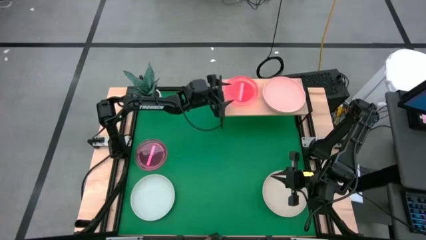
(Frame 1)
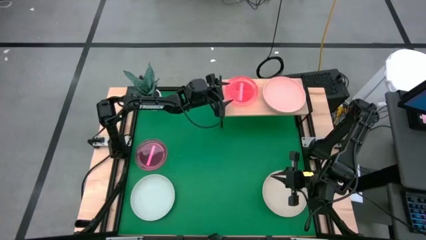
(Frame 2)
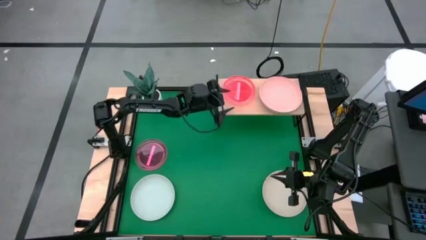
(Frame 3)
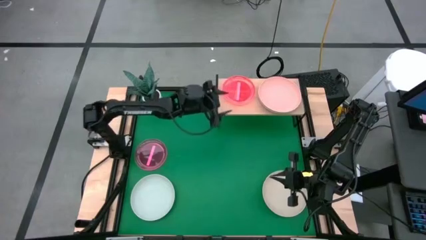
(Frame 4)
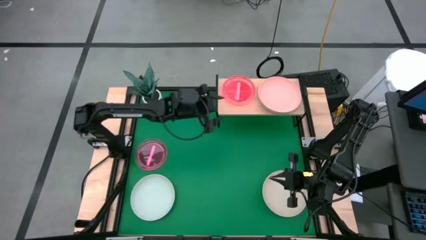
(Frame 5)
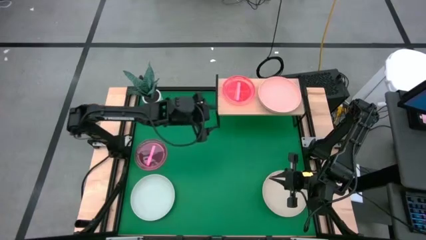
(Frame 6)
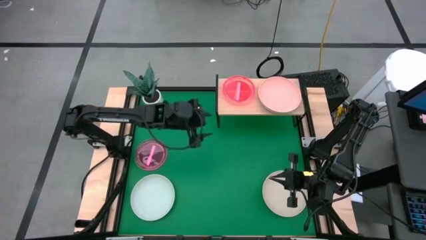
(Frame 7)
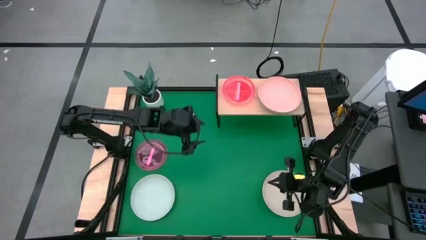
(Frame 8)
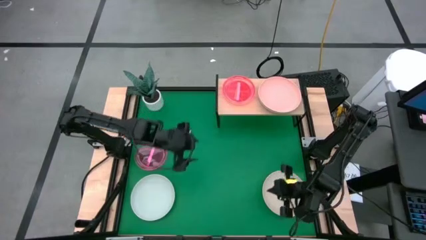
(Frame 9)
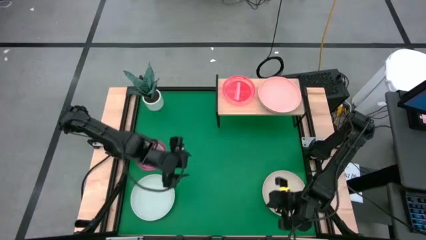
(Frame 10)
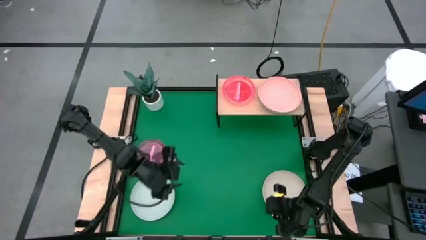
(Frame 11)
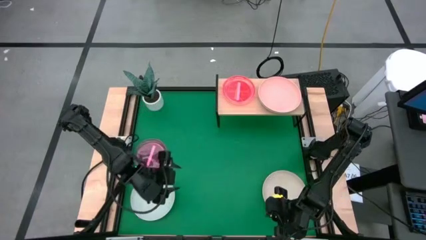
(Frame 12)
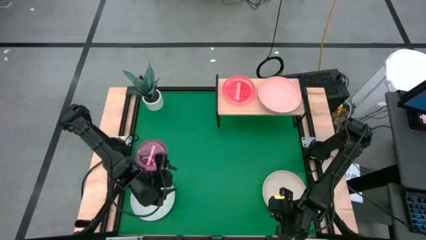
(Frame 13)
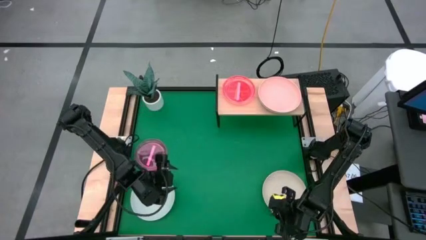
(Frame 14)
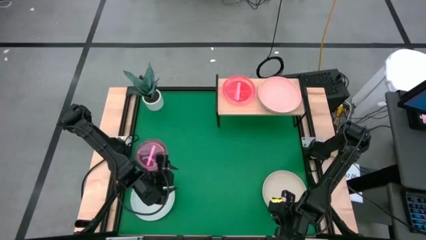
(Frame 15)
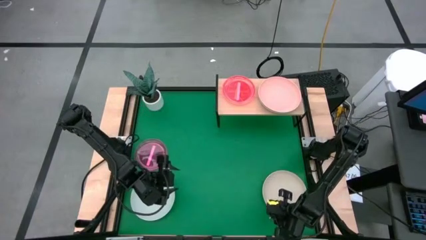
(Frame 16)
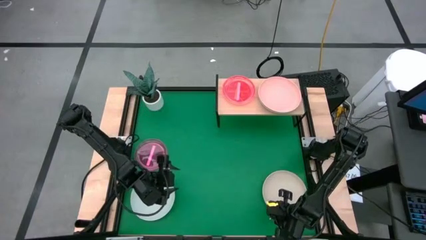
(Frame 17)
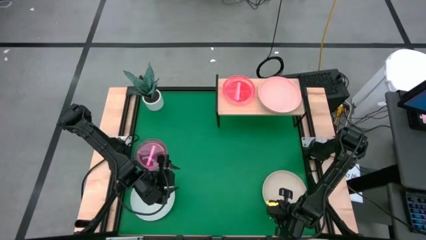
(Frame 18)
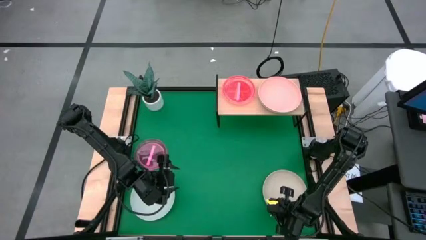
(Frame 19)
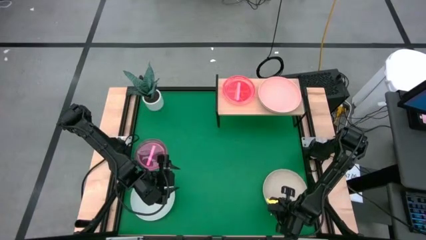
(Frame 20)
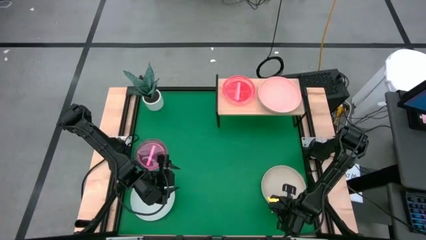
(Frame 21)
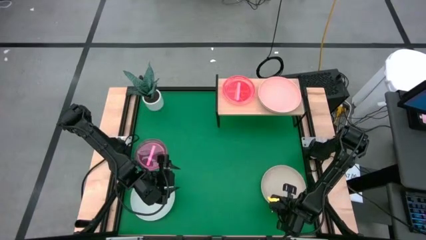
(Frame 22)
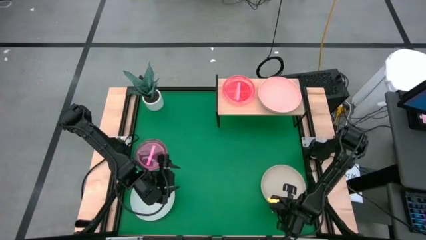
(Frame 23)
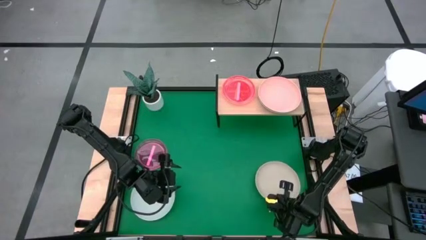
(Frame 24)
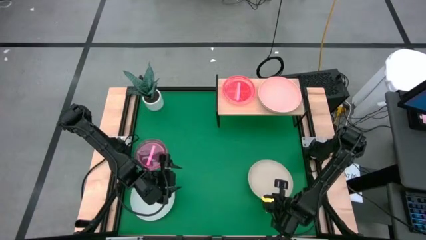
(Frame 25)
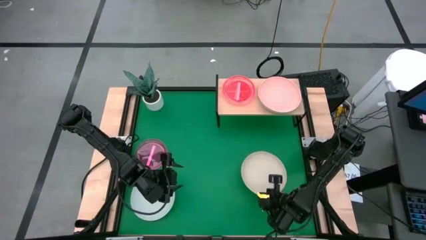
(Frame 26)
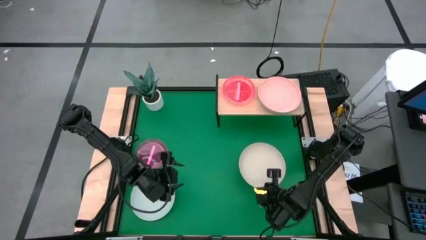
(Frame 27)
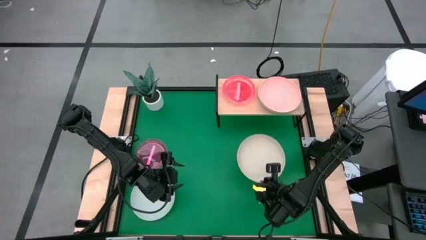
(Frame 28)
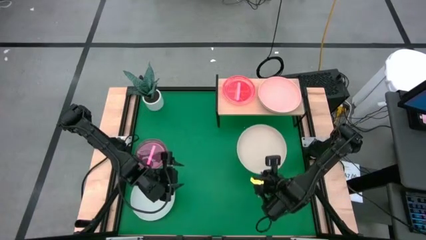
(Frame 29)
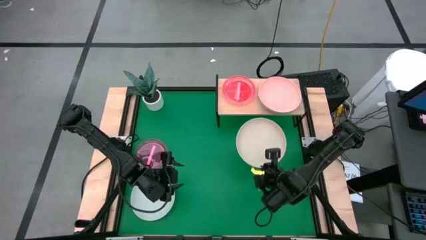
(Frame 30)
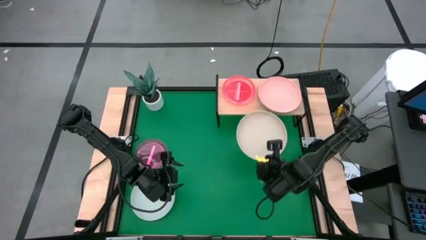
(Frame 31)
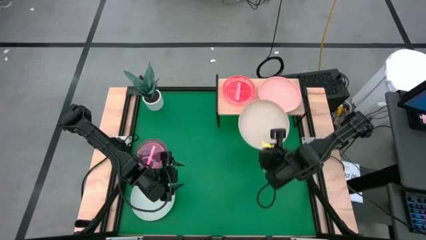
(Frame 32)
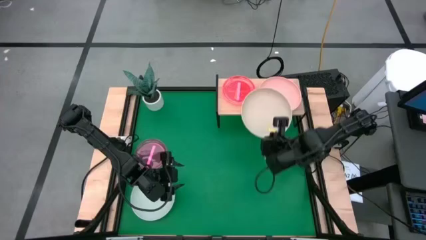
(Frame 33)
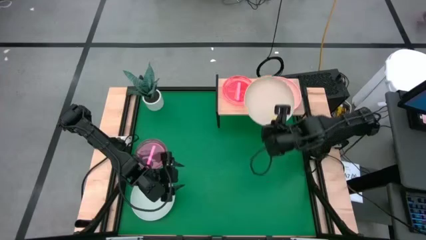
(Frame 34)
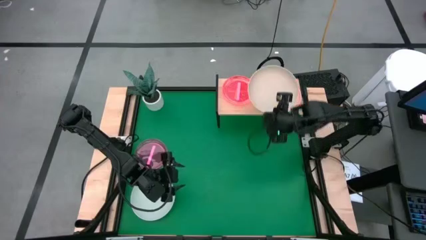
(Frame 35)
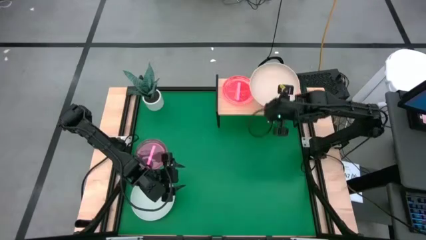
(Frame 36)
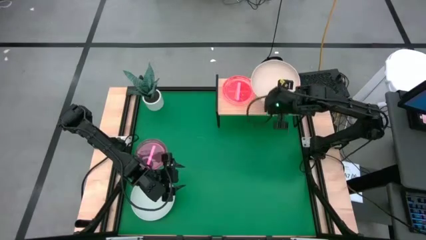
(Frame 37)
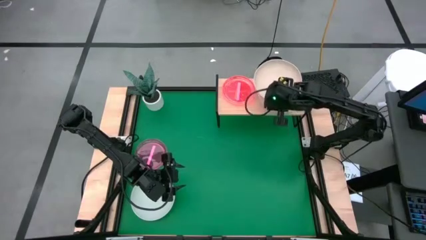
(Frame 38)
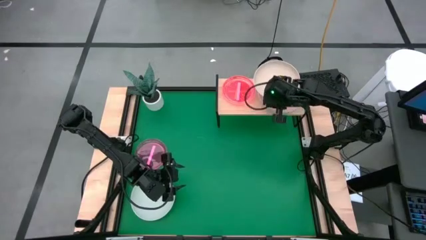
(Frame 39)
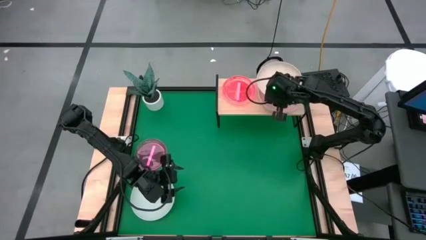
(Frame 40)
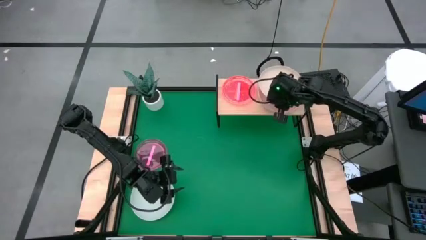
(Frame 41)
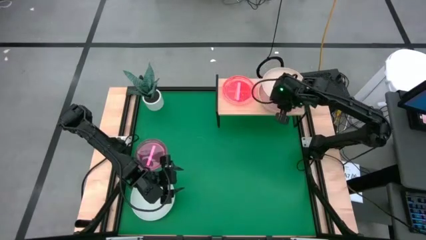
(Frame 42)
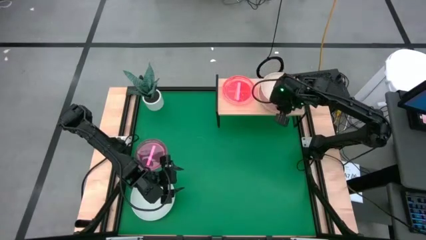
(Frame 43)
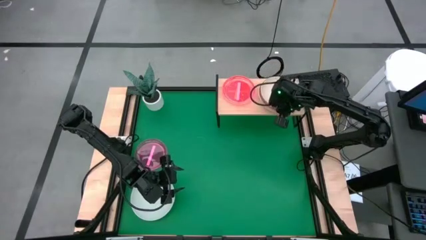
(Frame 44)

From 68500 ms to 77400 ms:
Task: Place and stack plates onto a shelf
Stack the large light brown plate on top of the large pink plate on the shelf

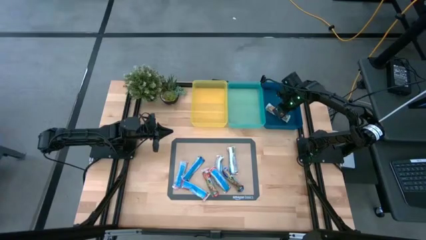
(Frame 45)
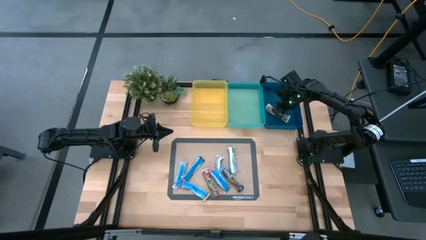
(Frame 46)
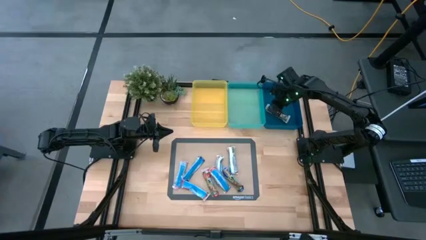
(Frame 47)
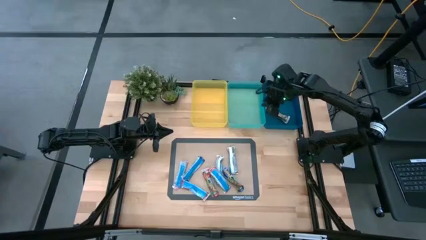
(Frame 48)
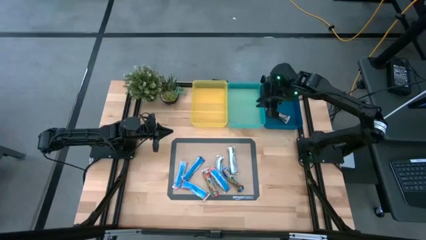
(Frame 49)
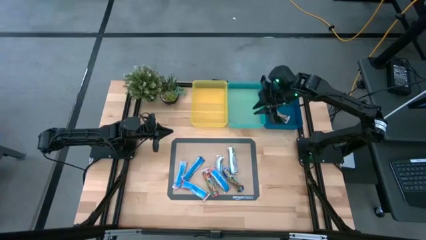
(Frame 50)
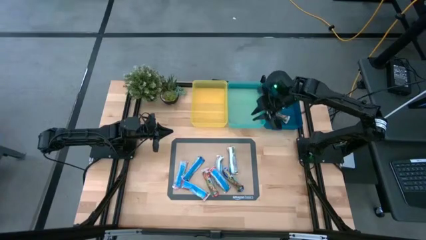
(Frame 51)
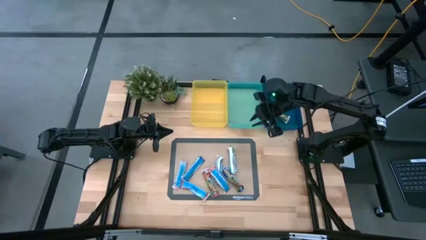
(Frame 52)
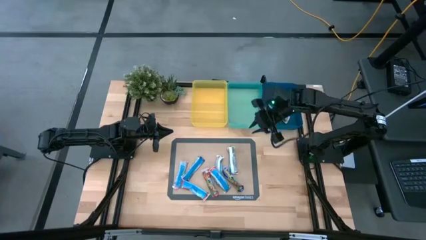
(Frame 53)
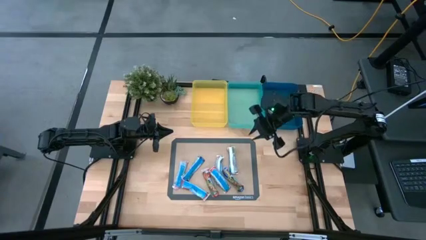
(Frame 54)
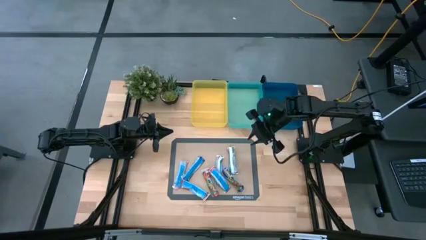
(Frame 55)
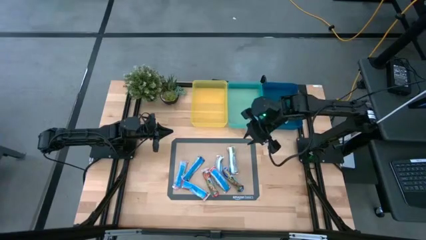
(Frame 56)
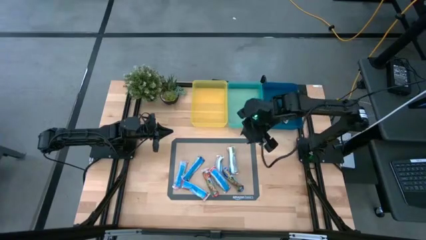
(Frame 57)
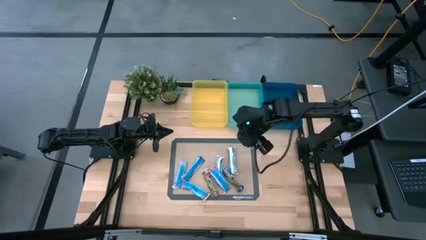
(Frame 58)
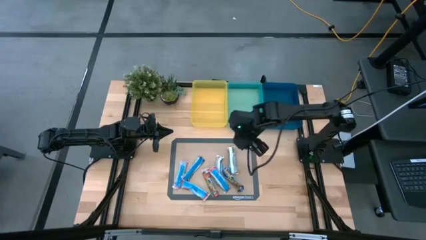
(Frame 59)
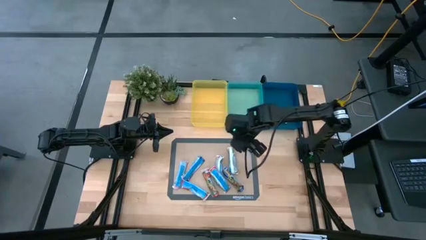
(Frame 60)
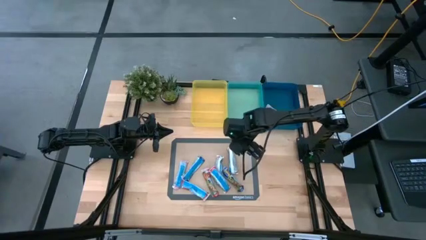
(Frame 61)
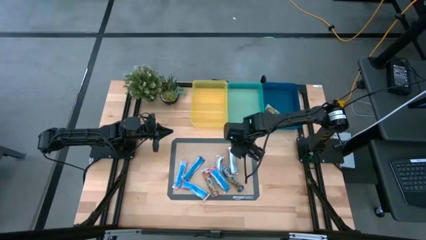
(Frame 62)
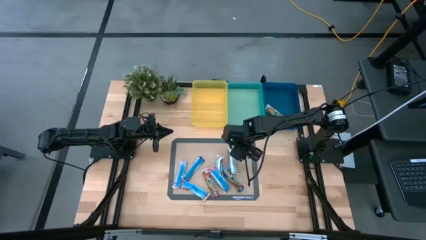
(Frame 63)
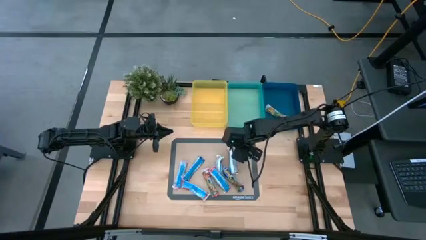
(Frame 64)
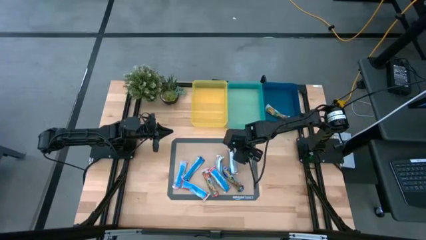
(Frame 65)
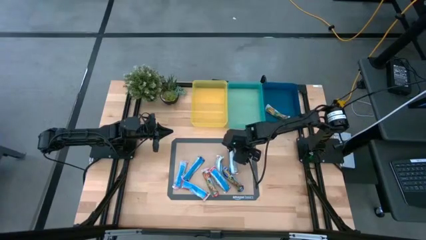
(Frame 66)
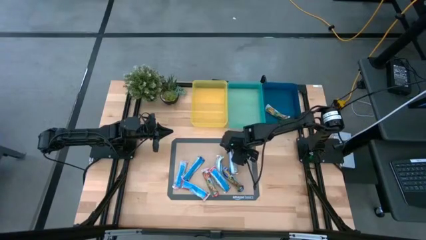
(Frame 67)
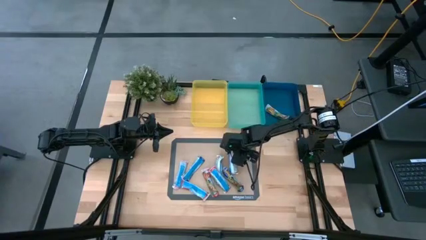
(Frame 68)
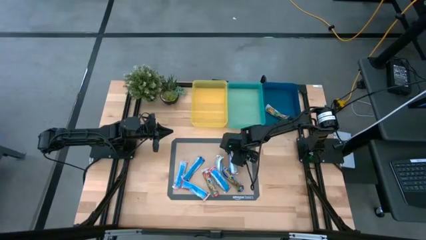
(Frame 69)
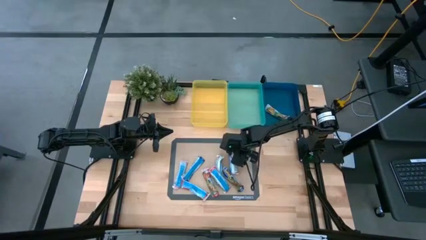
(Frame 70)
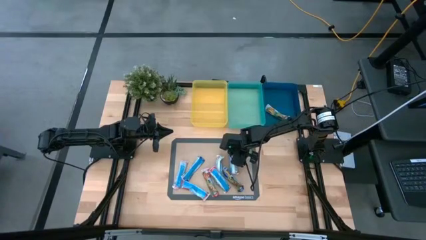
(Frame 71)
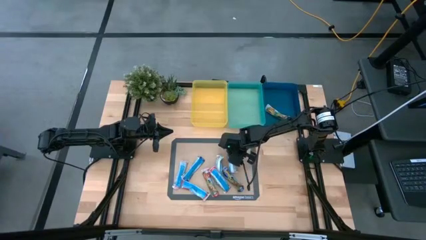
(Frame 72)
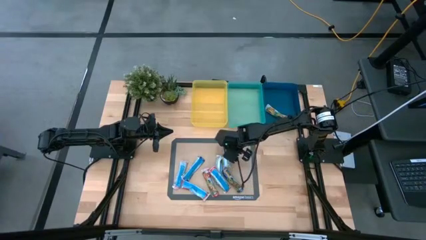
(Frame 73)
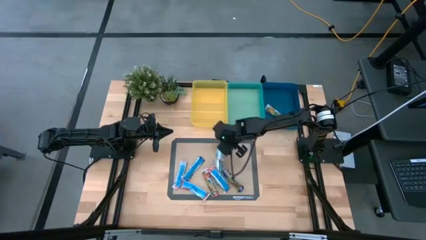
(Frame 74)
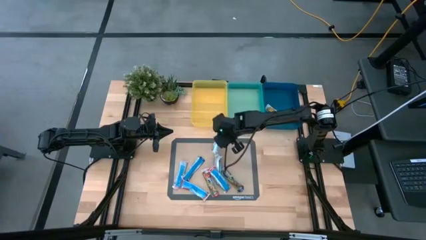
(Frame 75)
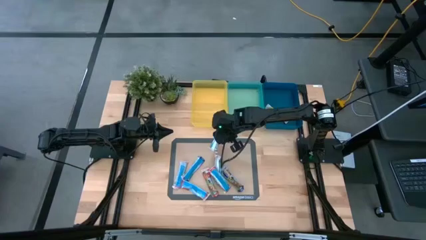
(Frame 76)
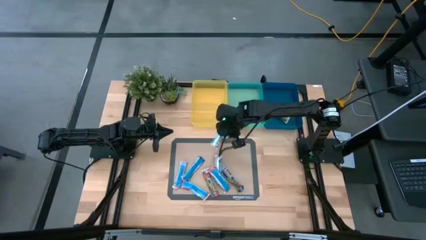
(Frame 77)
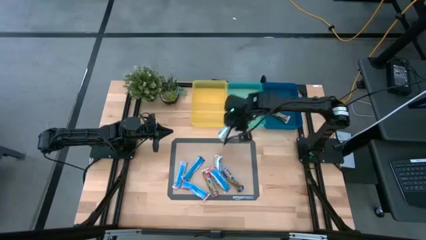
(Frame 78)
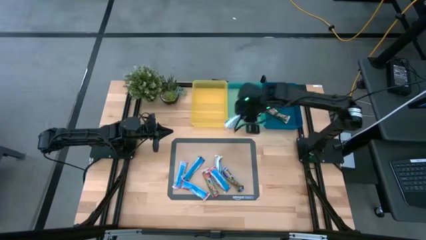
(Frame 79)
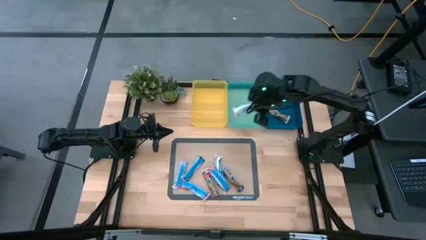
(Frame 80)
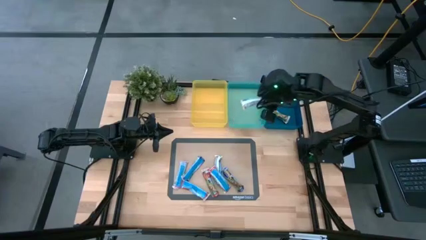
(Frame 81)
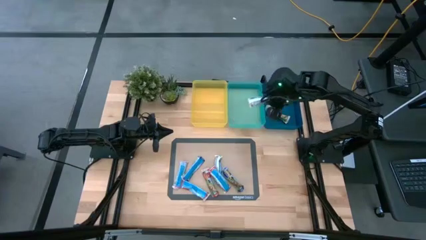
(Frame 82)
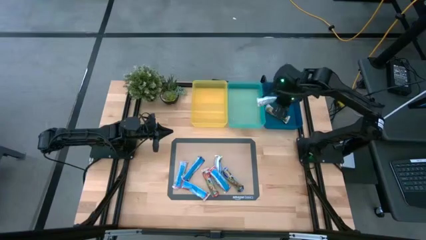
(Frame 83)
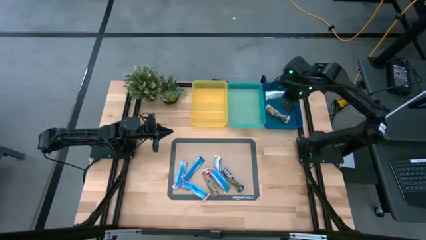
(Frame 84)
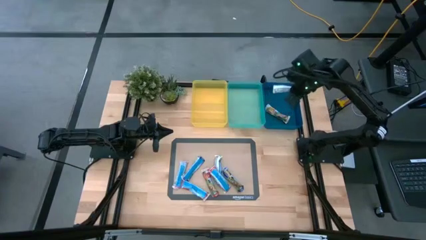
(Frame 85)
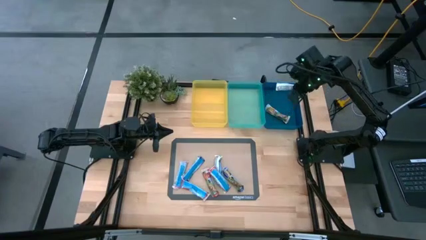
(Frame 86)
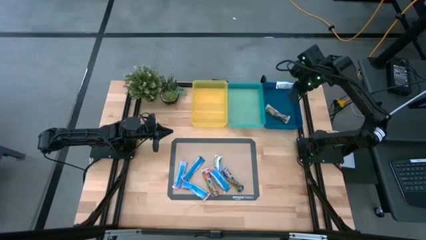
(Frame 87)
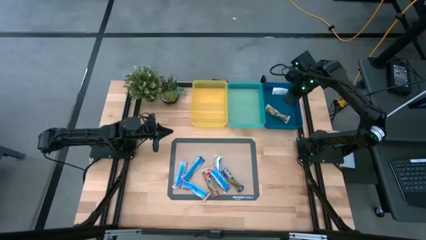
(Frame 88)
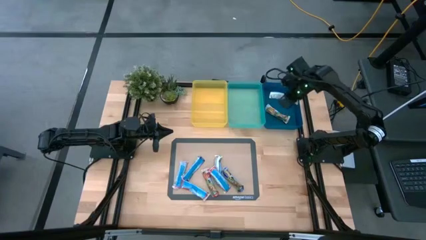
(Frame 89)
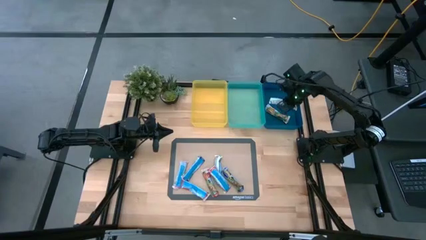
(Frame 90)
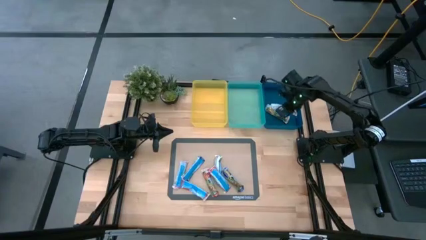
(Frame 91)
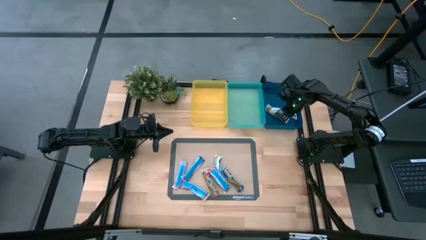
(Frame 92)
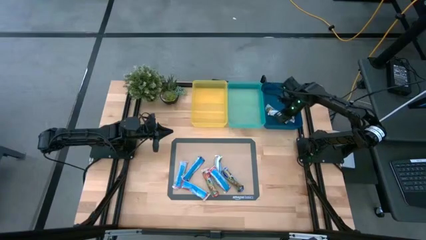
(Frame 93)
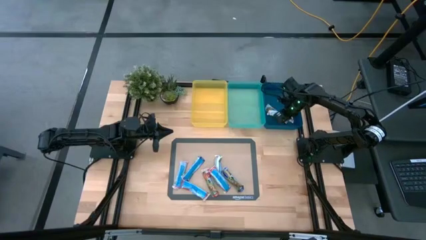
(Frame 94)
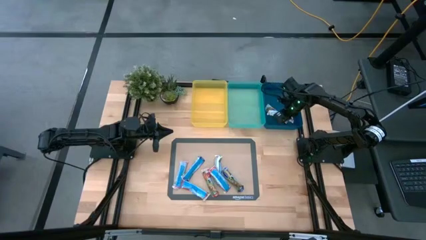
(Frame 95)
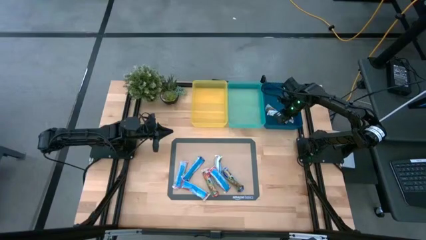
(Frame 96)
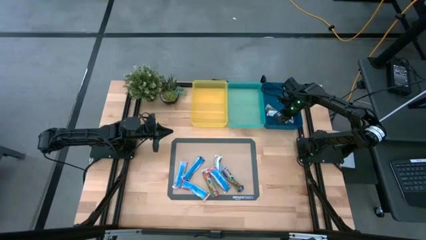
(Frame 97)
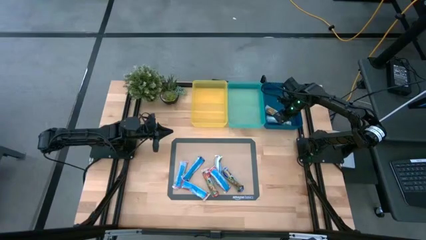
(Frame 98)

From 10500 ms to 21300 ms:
Task: Pick and place Granola Bars by type
Put the yellow granola bar into blue bin
